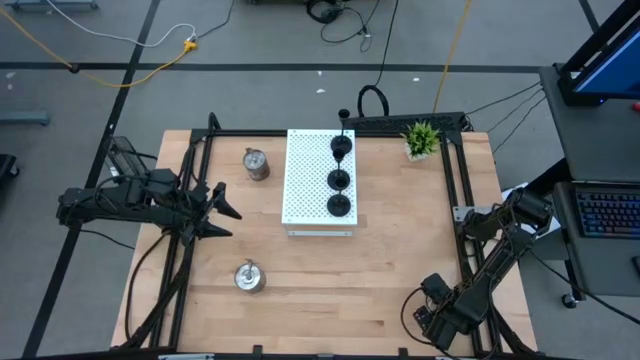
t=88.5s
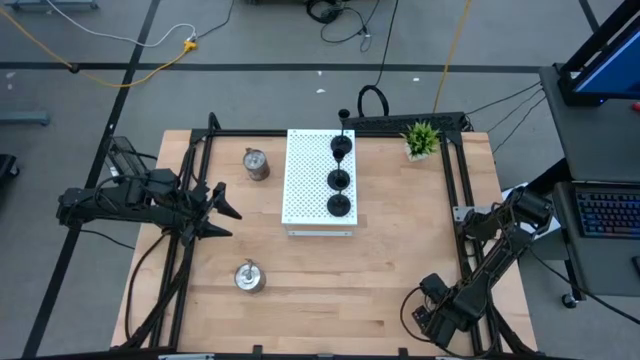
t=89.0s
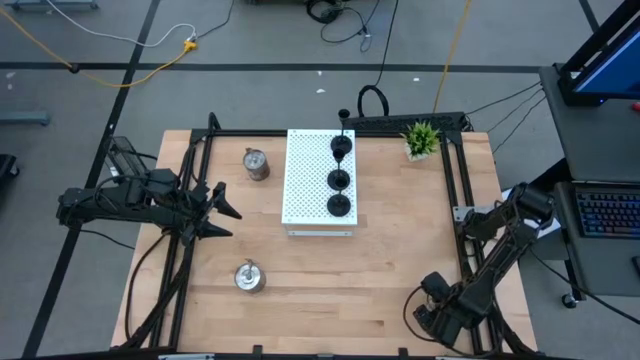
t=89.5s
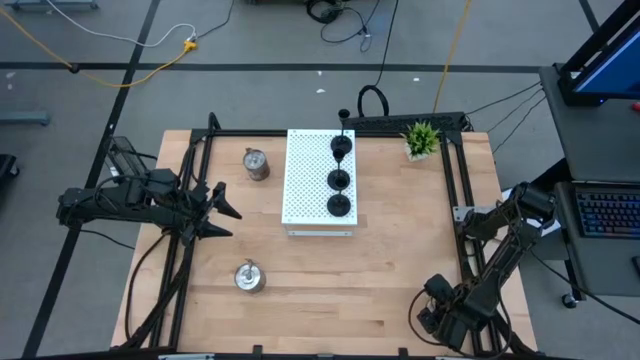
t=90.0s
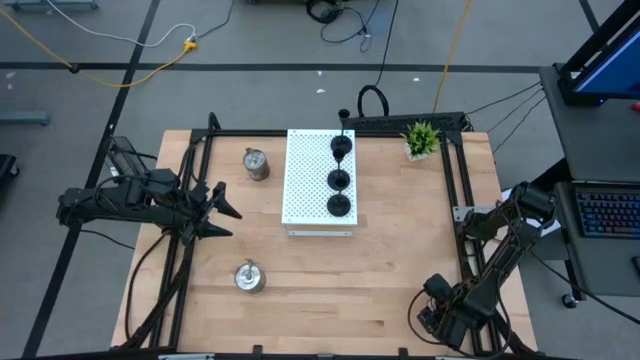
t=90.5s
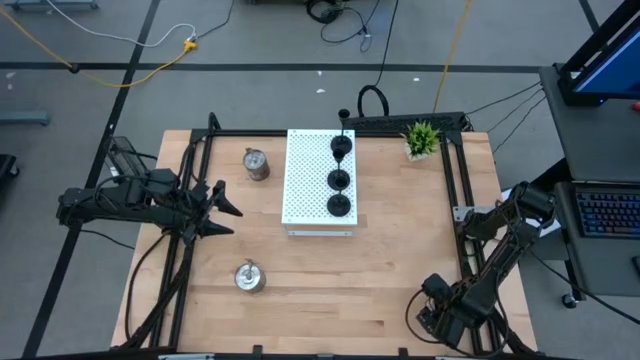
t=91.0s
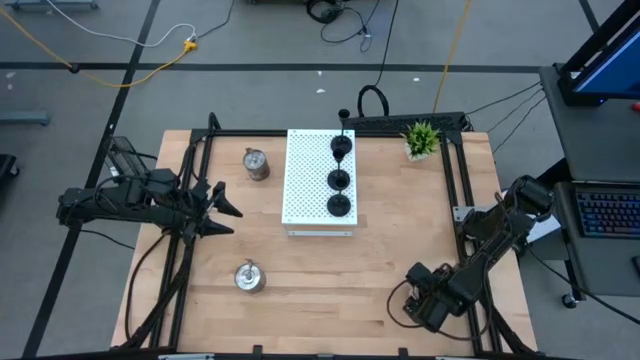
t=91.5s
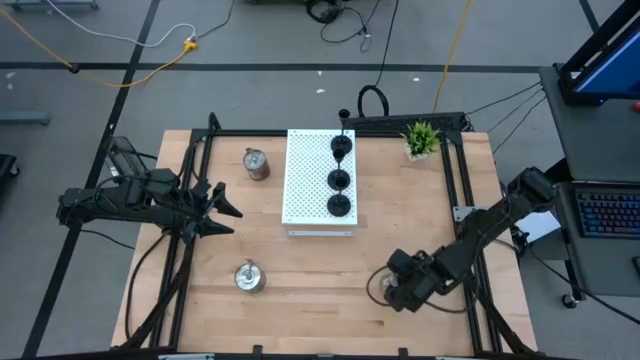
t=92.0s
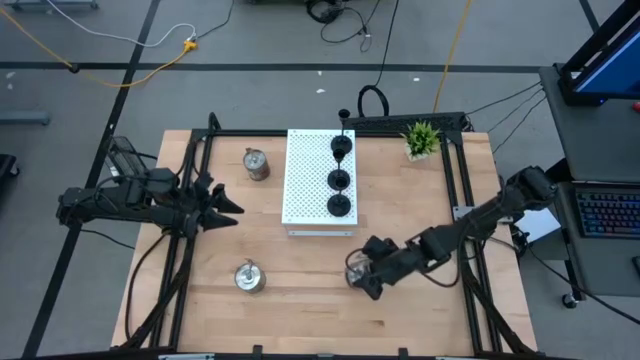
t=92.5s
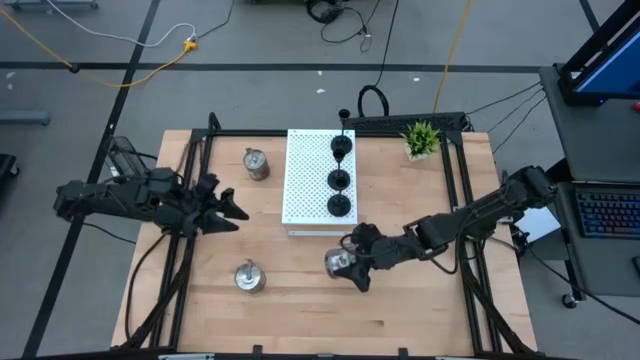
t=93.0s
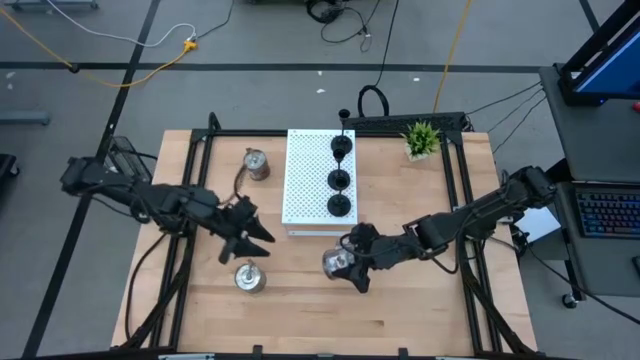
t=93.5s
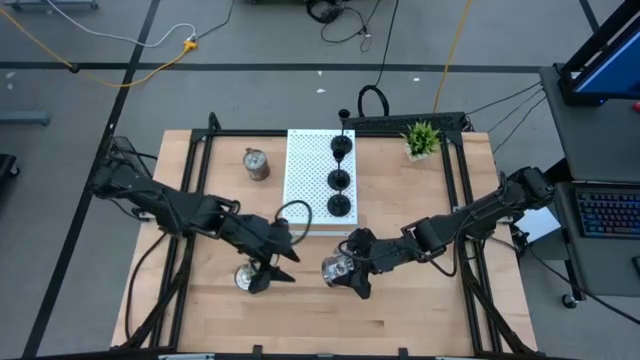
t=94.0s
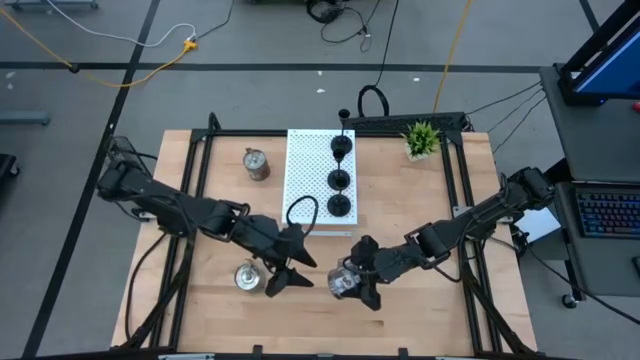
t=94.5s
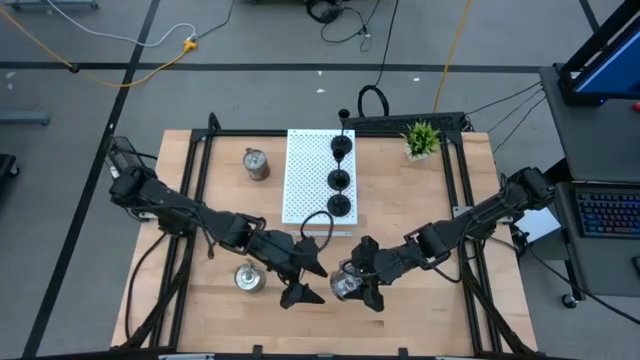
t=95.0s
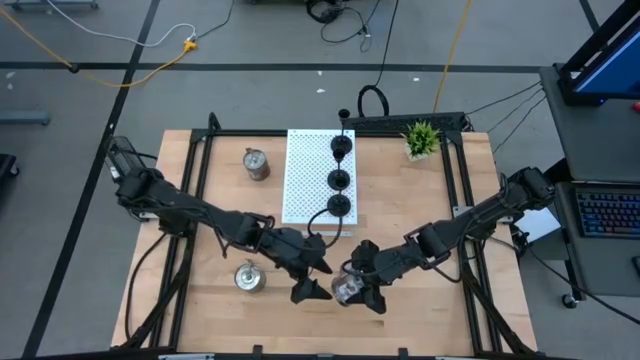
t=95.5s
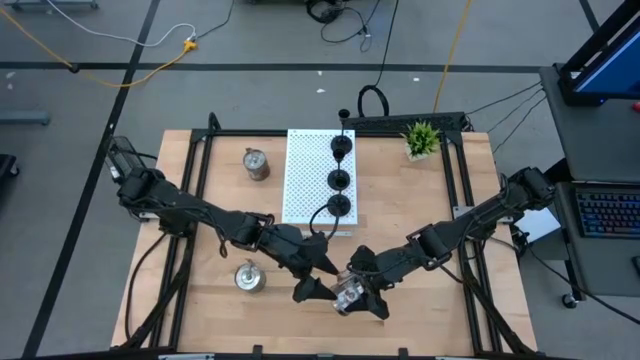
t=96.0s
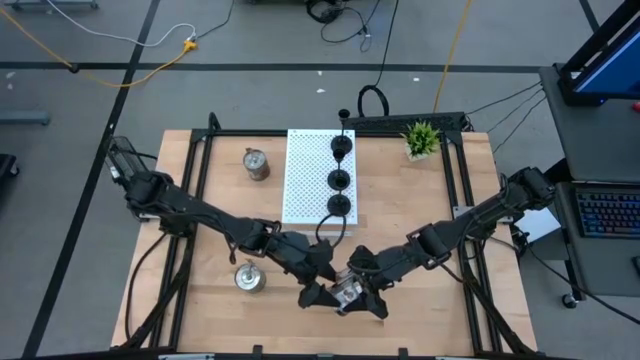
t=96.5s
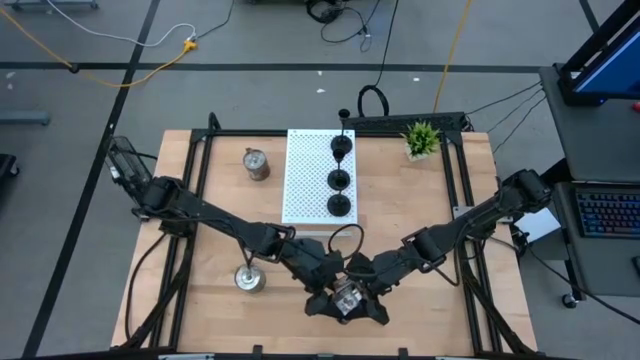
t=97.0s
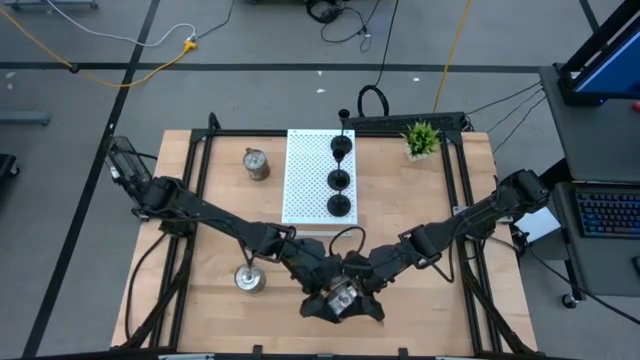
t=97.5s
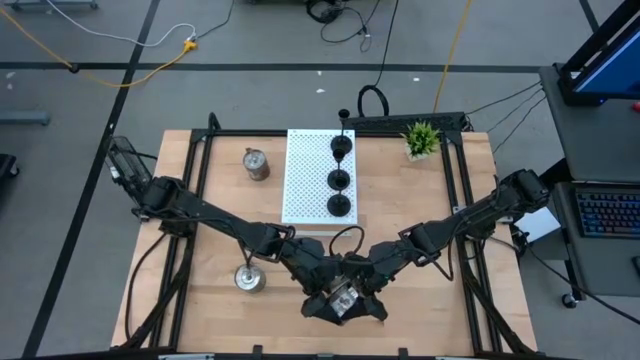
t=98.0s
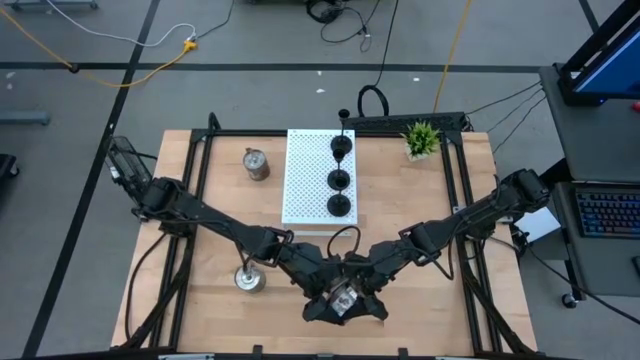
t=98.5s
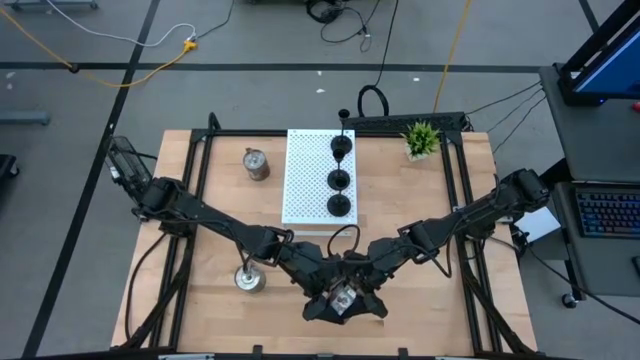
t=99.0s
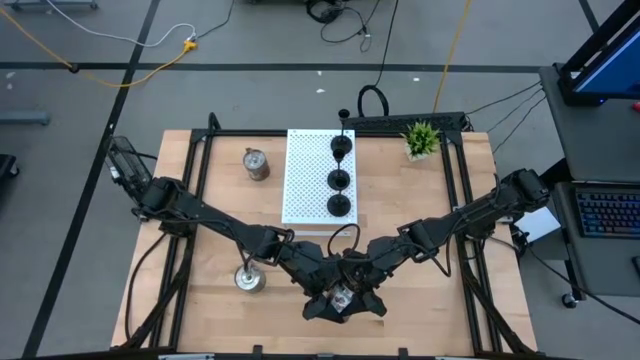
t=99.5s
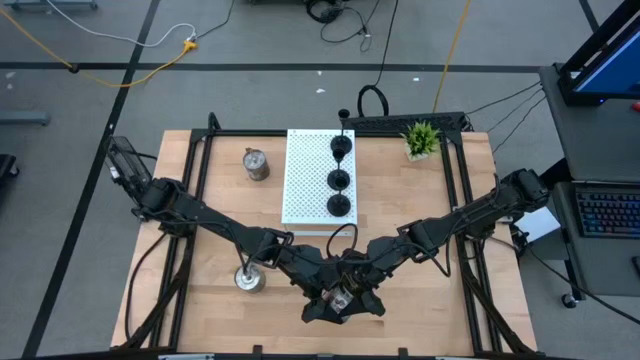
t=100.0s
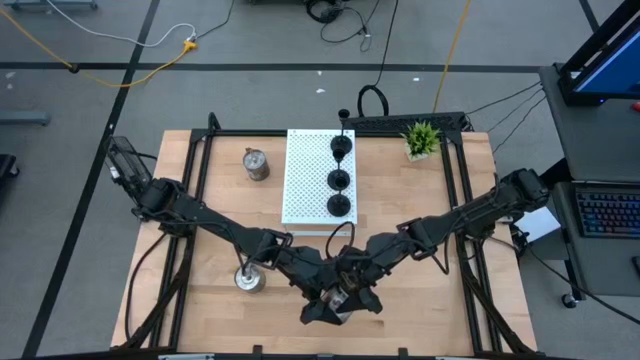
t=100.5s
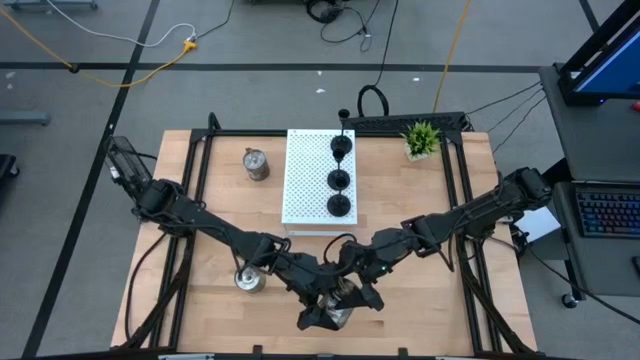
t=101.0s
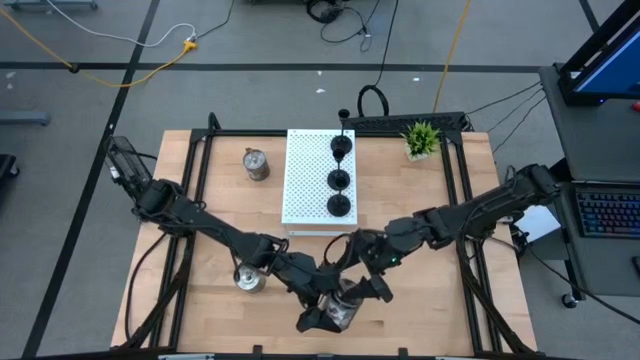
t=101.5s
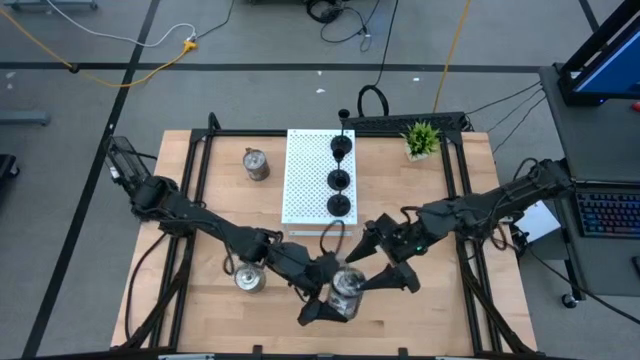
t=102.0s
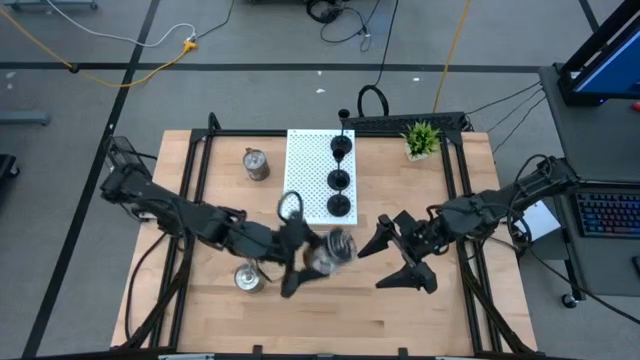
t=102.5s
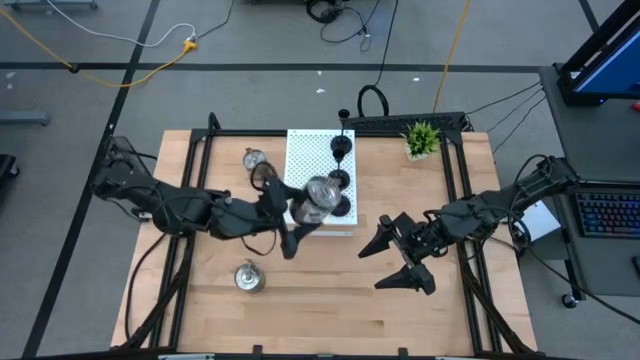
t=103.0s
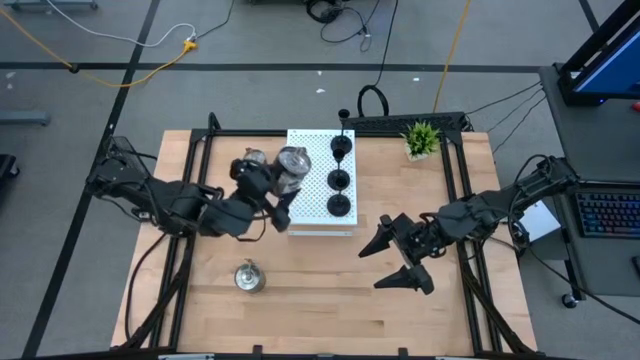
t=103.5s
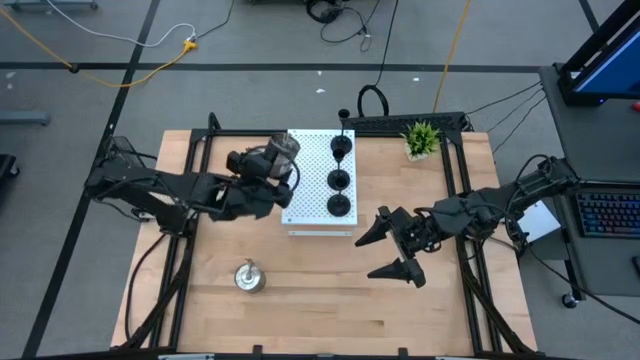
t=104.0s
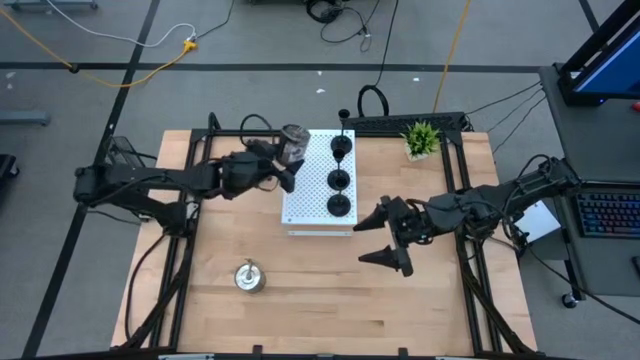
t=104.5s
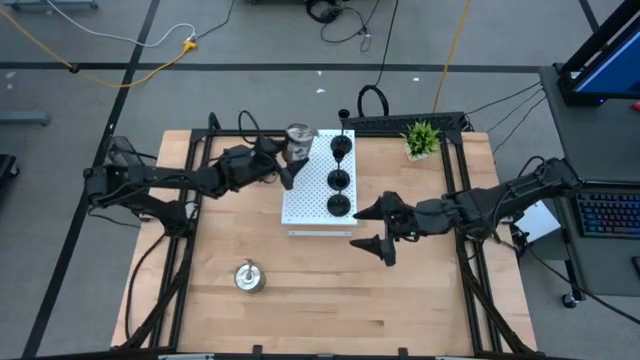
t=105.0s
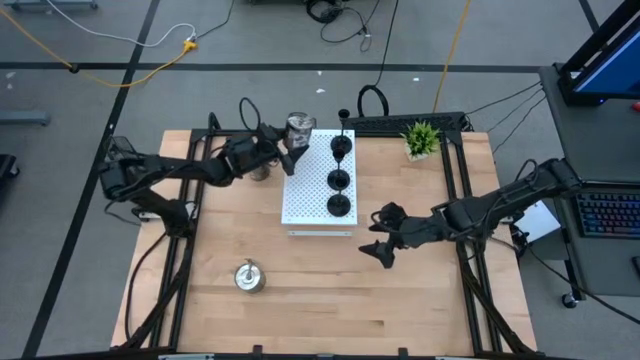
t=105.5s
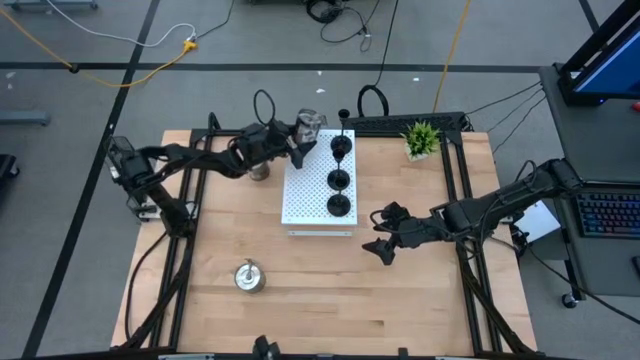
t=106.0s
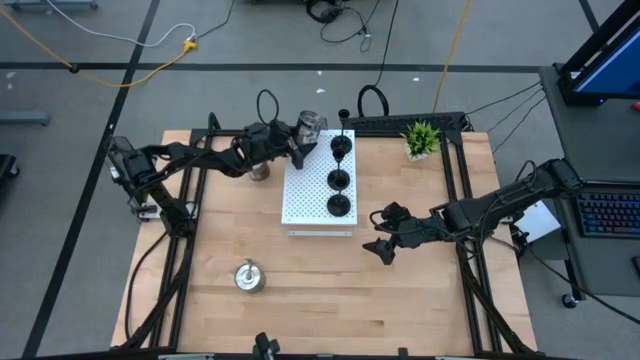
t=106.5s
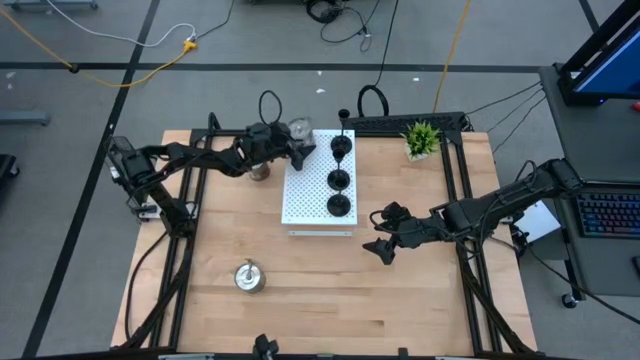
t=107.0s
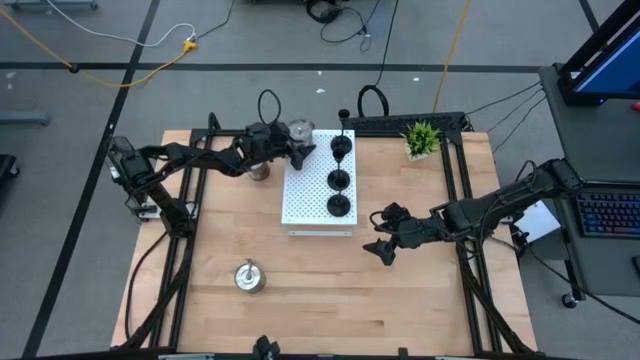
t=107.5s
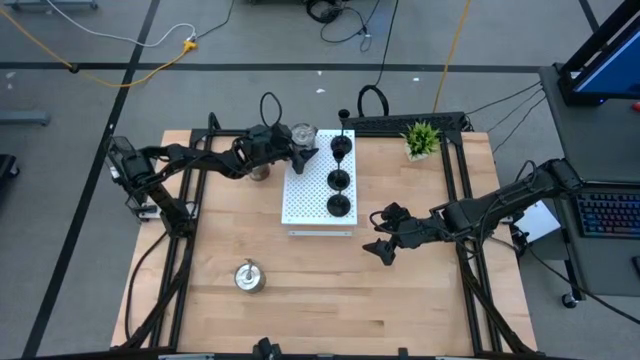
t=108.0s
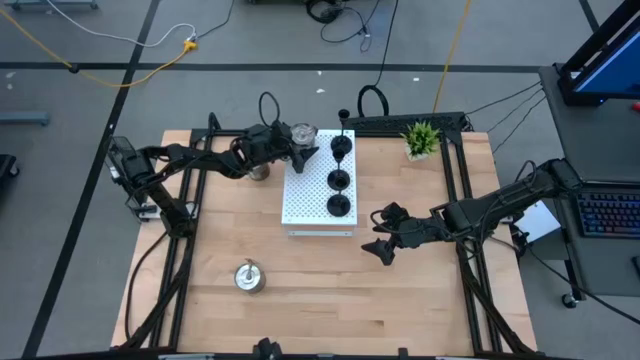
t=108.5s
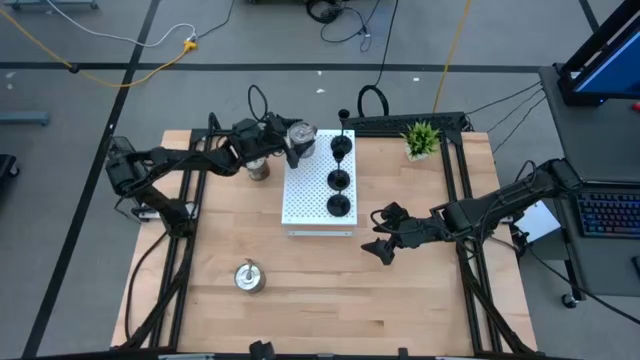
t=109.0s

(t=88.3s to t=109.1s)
Task: Pick & Place candle stick holders
Put the bottom right brown scented candle on the shelf

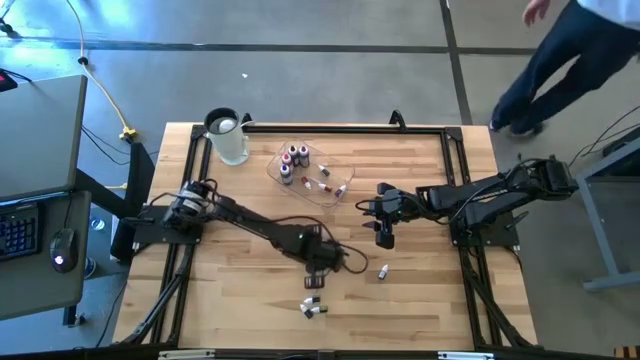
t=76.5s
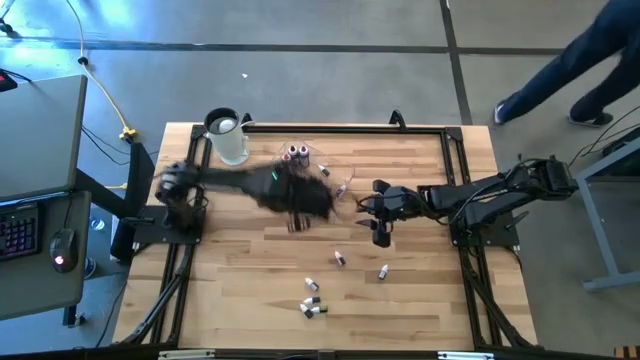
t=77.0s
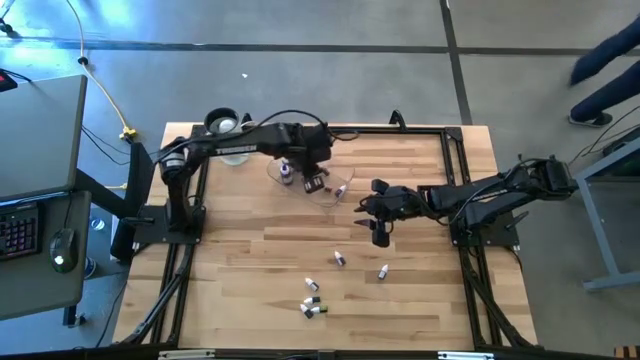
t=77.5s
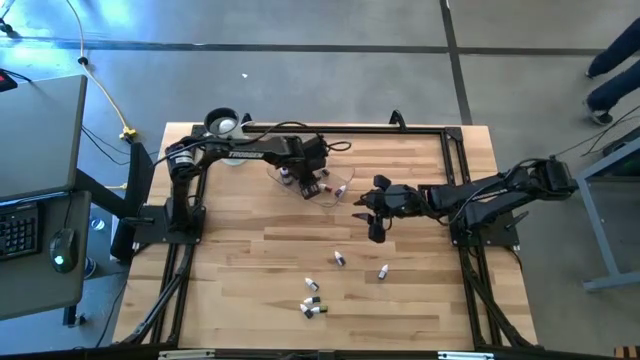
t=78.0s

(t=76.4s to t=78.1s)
Task: Pick & Place food coloring
Put the small red food coloring bottle into the bin
